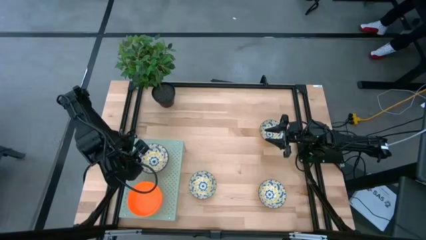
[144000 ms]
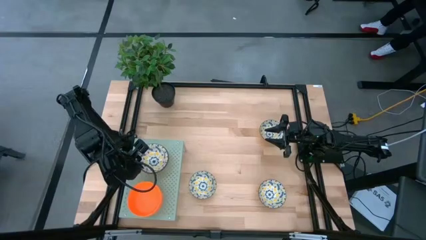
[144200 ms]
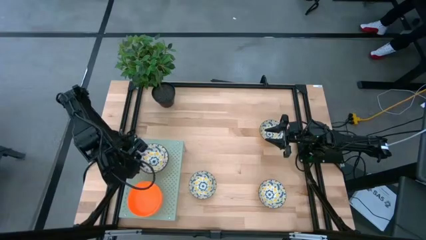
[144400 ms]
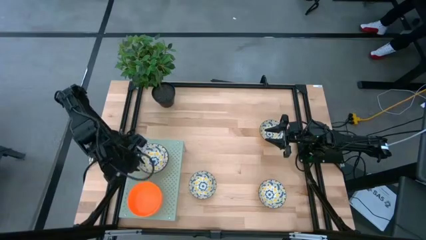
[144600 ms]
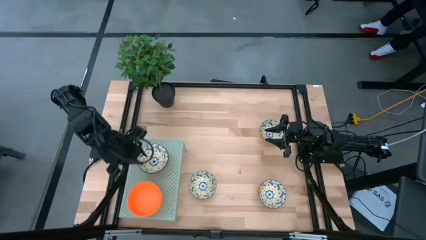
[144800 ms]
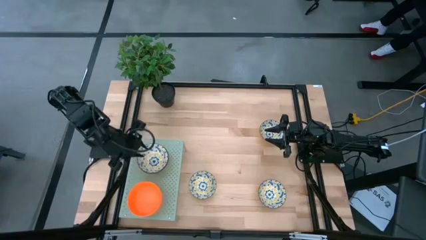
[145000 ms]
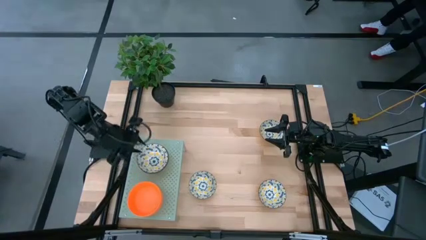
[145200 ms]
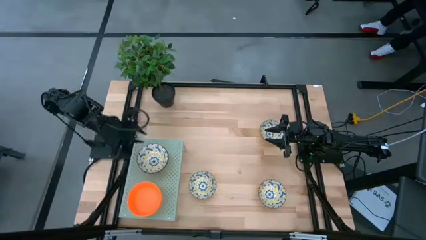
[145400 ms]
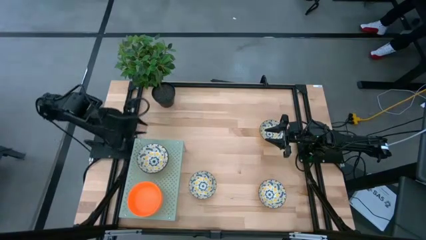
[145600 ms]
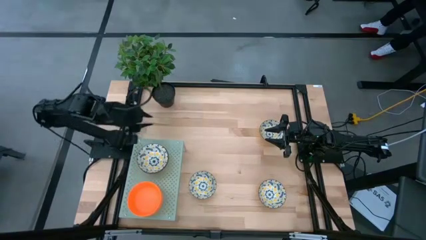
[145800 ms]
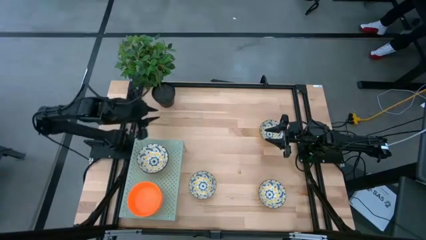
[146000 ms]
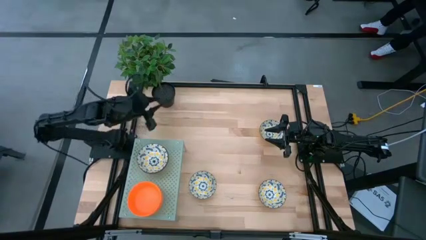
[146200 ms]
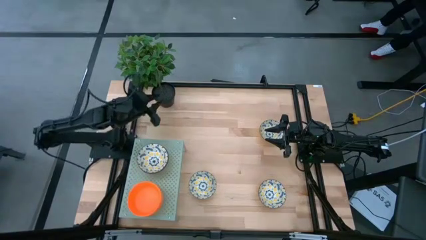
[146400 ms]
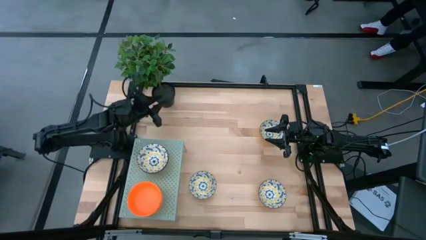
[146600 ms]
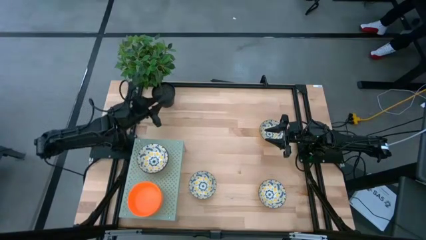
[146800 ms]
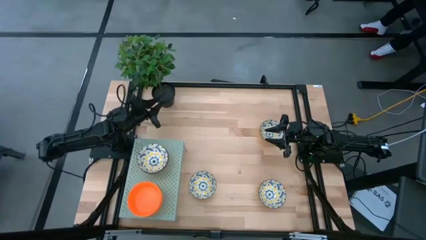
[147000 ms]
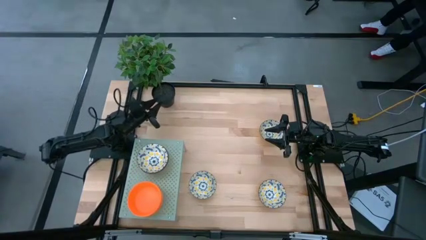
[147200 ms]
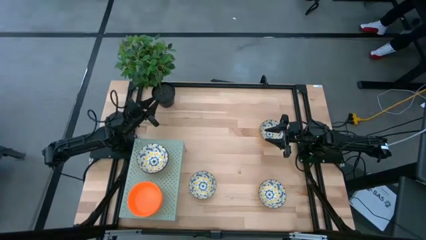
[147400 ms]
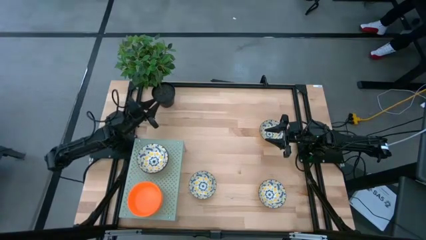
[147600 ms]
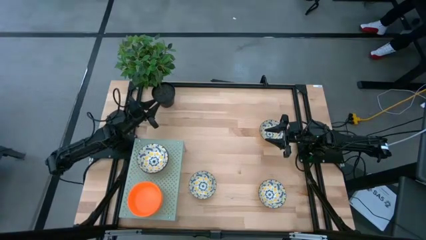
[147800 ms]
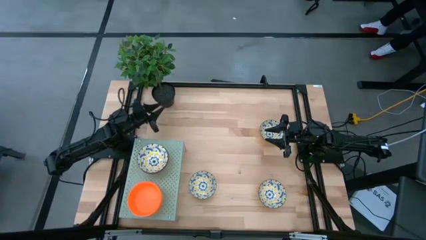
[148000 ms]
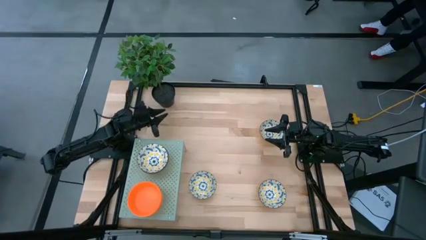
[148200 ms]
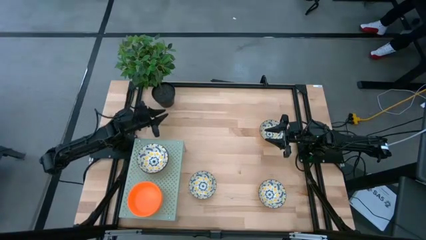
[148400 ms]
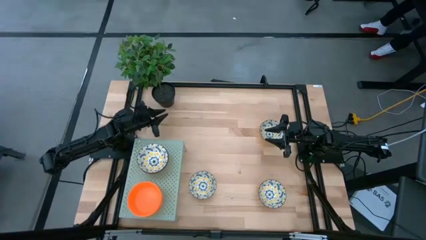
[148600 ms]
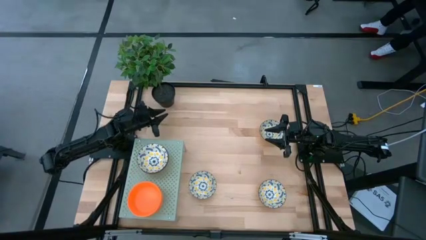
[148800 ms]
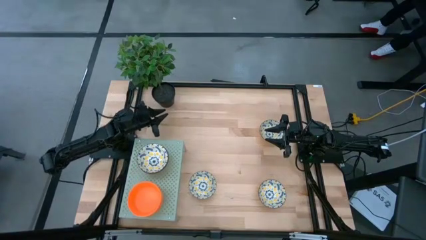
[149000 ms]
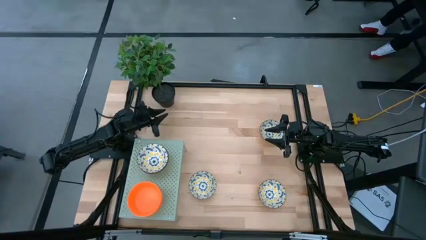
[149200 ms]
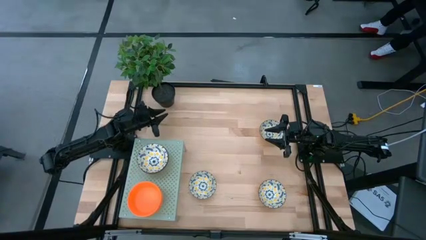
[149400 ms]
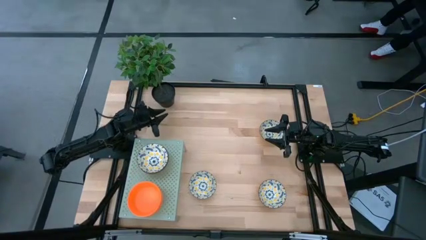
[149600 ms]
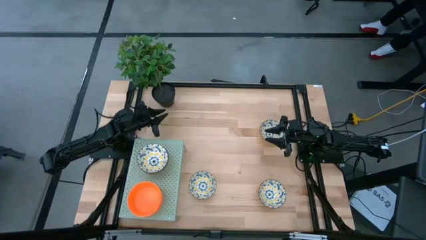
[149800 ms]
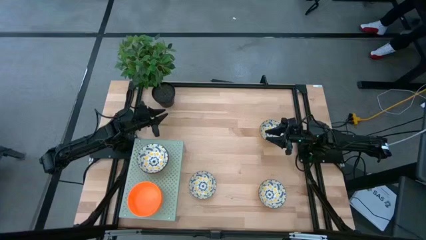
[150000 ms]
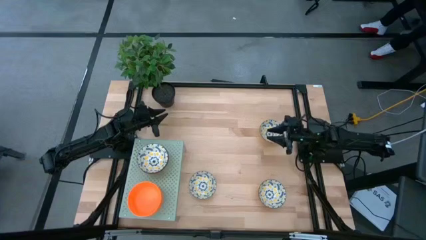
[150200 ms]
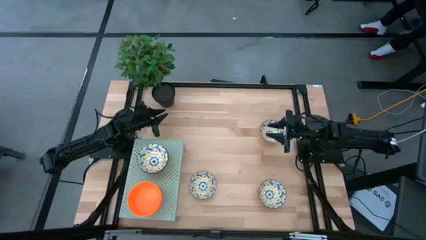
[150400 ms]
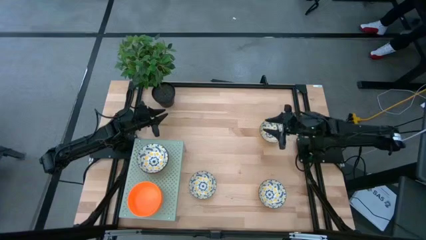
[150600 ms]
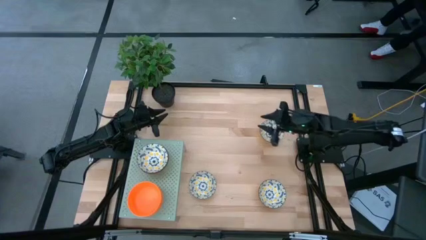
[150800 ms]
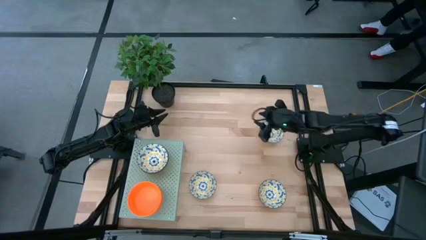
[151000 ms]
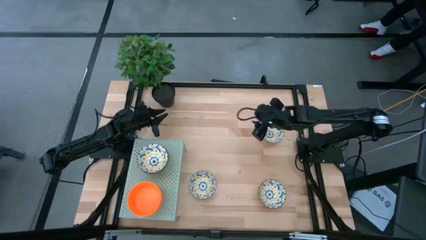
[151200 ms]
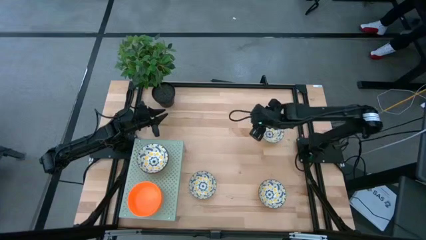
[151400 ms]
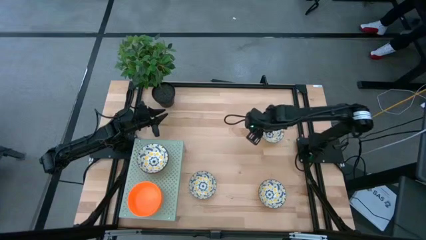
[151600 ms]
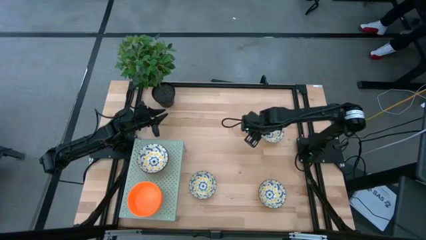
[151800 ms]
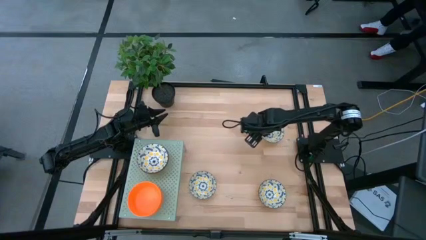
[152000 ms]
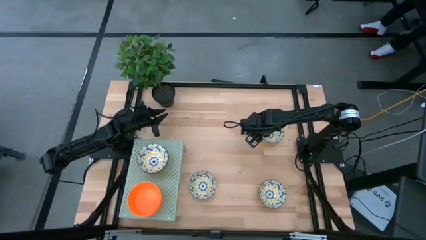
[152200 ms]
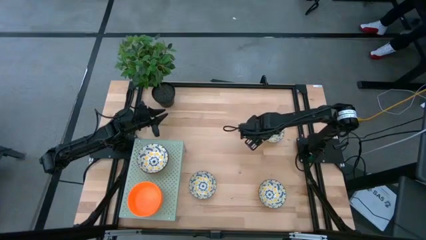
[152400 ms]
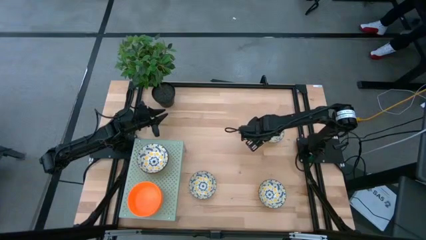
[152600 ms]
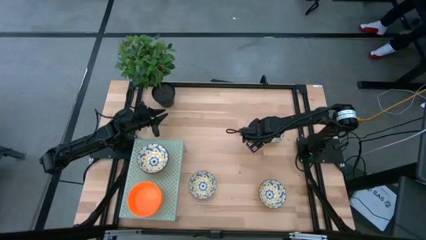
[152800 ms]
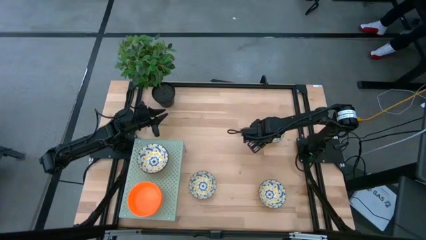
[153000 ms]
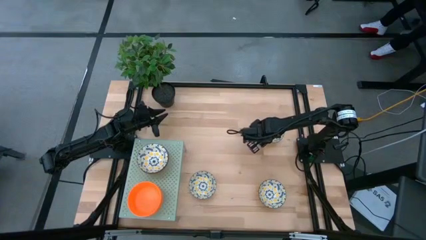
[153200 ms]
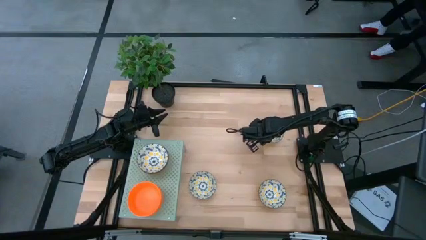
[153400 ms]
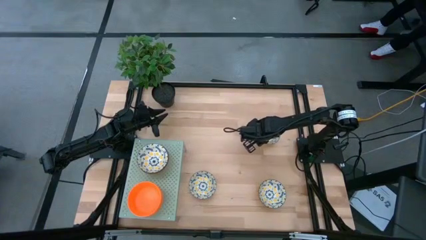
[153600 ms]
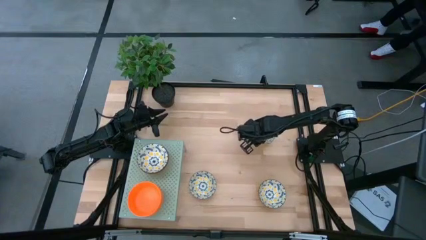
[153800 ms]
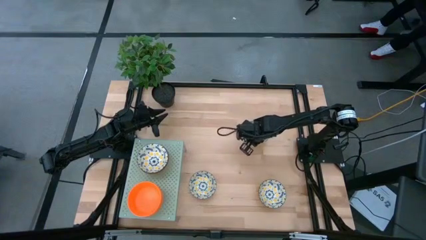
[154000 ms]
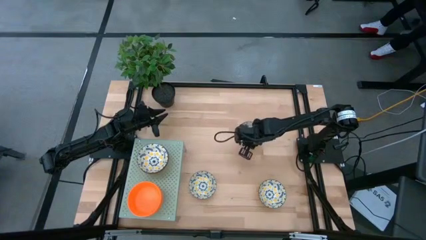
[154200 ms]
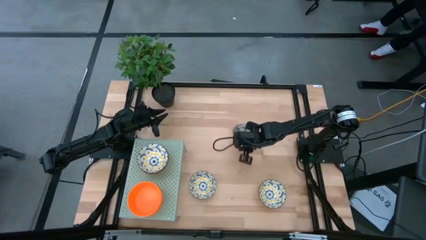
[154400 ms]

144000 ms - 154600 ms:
Task: Pick & Place Mini bowls
Stack the patterned bowl on top of the patterned bowl on the shelf

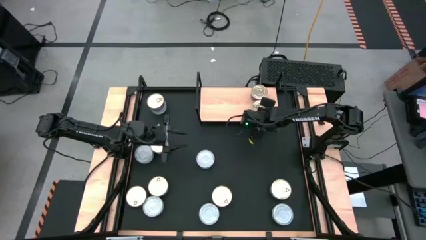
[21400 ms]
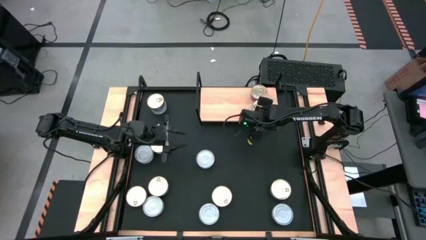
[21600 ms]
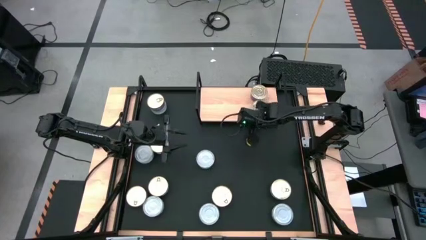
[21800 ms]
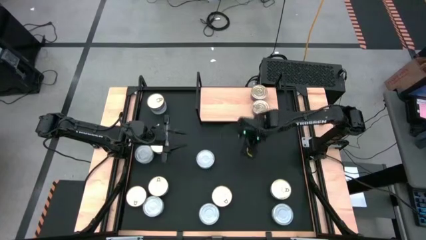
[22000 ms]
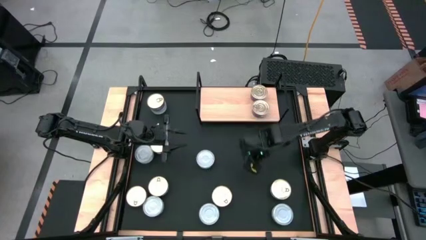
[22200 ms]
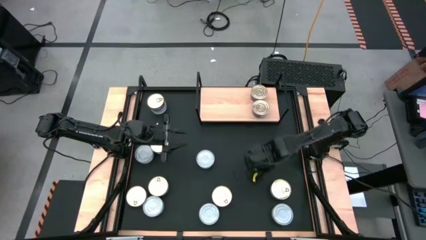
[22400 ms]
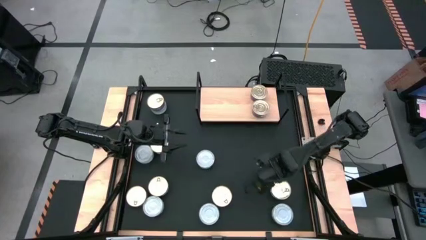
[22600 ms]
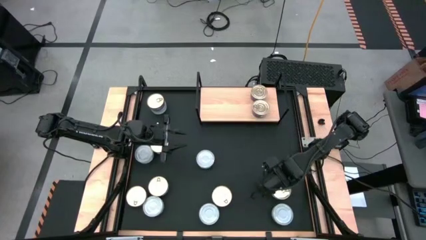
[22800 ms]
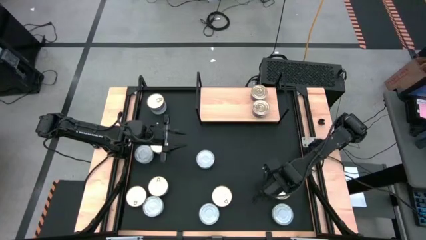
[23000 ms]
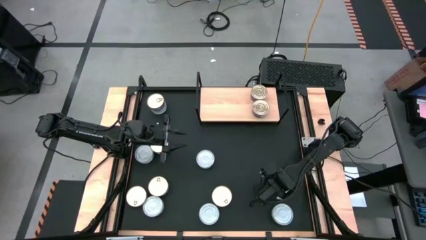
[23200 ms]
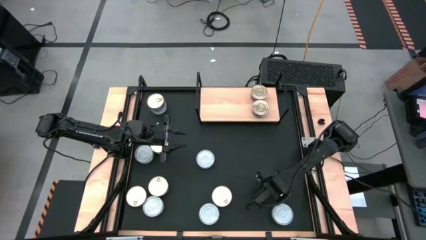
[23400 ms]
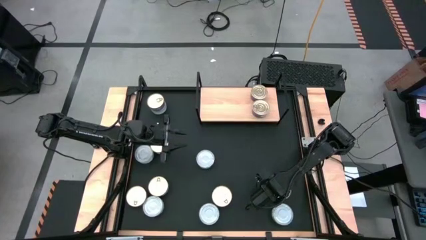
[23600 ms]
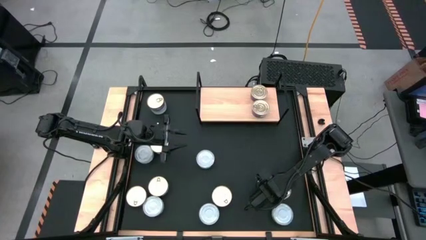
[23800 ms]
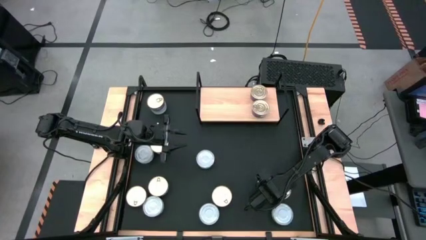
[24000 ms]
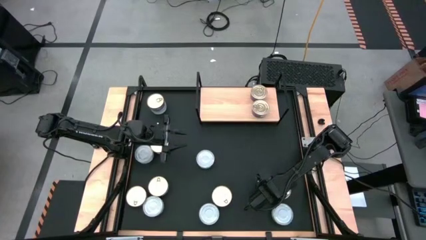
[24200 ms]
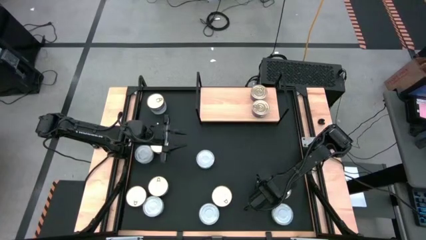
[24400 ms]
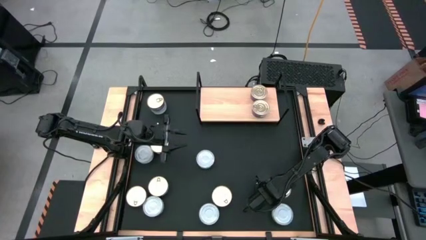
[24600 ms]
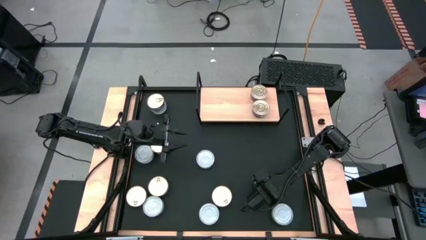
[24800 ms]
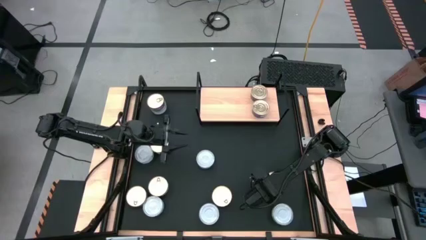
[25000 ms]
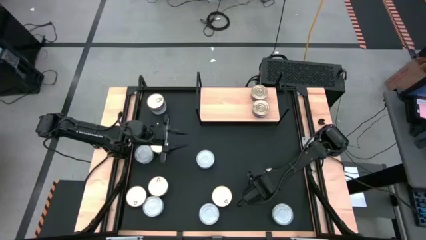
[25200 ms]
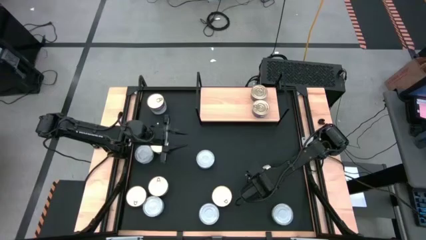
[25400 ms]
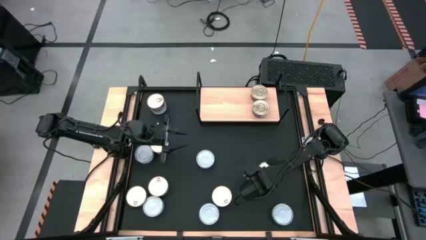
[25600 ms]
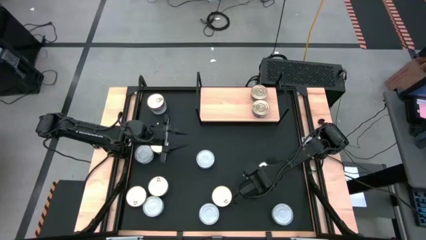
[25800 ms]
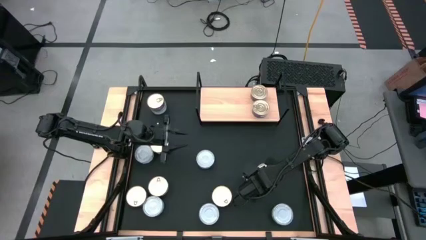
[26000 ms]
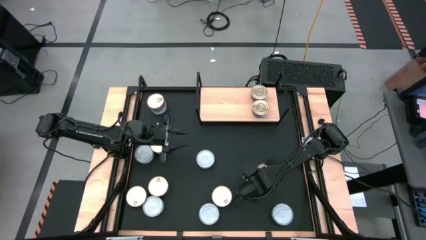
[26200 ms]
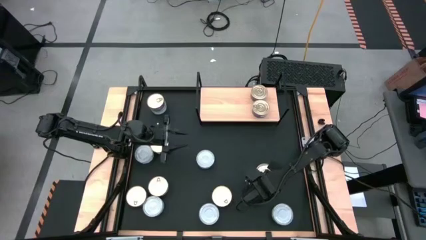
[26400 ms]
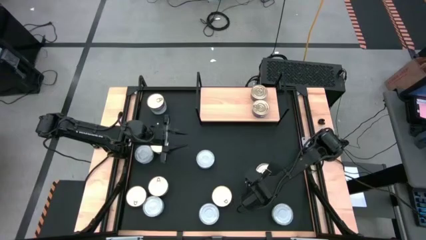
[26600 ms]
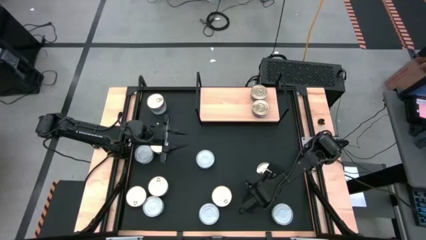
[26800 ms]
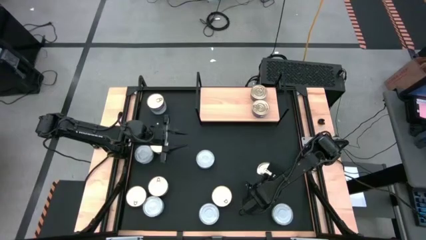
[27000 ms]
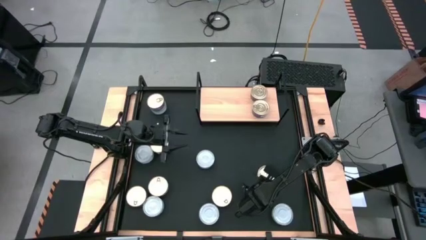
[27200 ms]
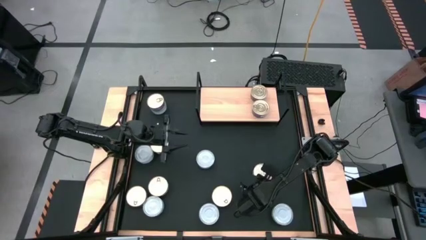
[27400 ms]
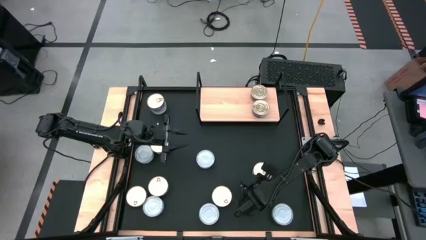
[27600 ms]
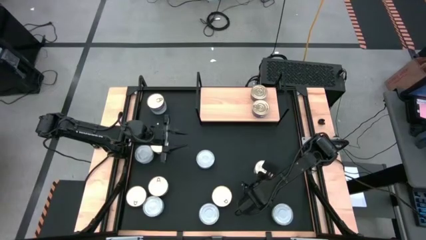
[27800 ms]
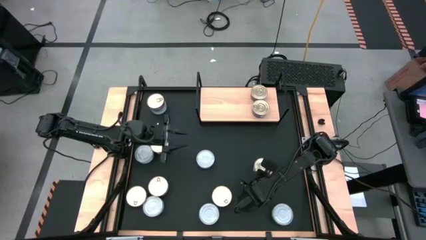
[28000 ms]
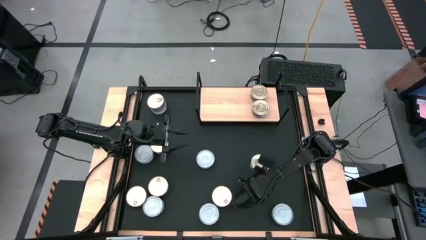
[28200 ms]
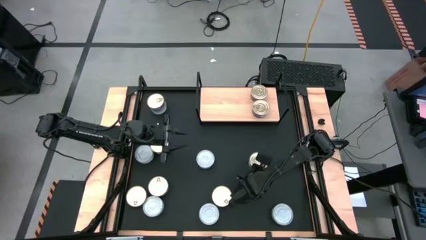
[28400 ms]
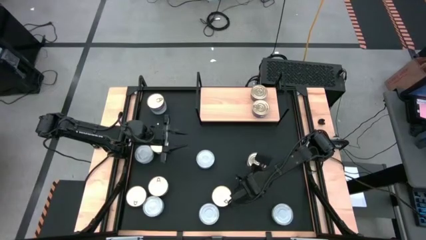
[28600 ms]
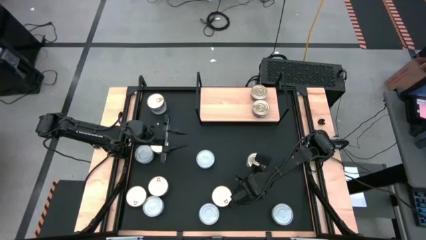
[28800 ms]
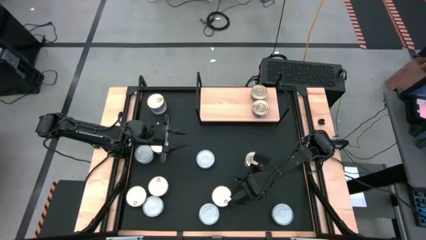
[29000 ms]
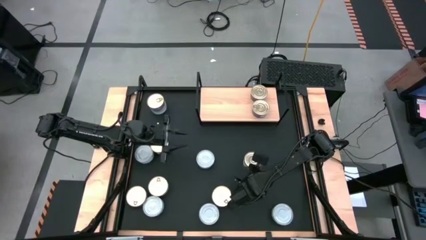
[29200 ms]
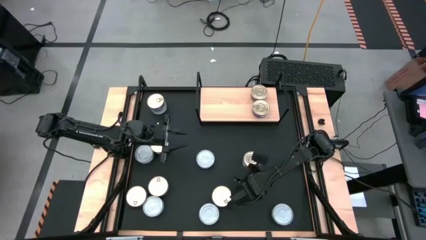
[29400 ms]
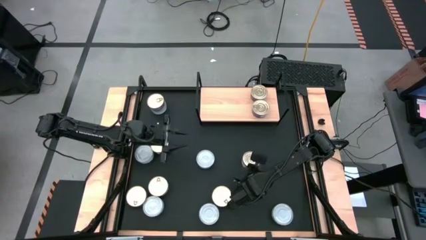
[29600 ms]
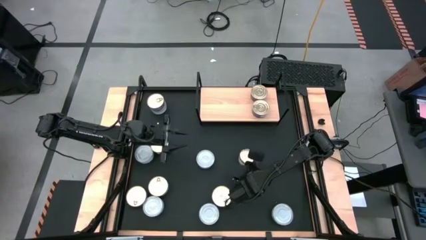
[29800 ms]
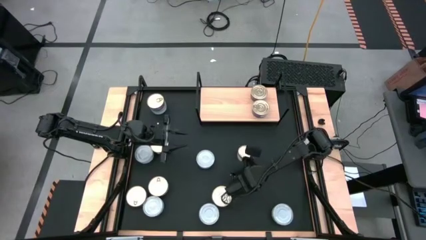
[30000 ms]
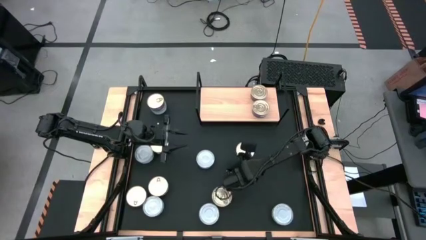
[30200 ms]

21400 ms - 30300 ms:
Task: Stack canned seafood by type on shelf
Put the blue pink tuna can the shelf
